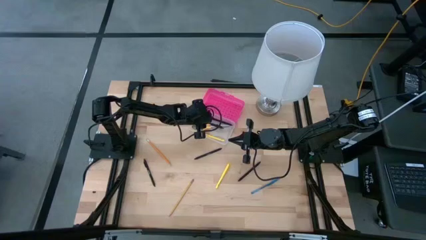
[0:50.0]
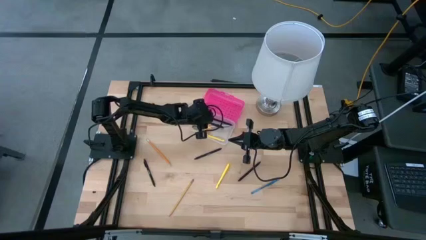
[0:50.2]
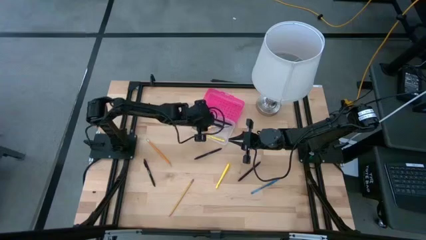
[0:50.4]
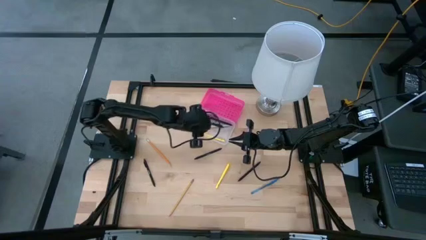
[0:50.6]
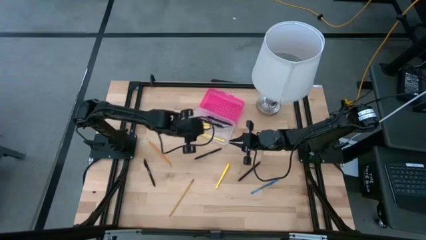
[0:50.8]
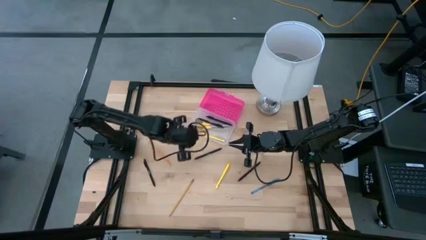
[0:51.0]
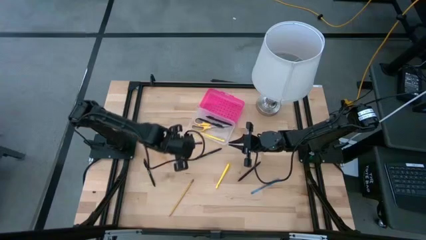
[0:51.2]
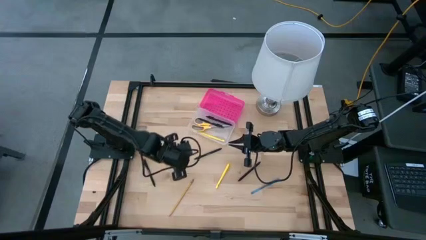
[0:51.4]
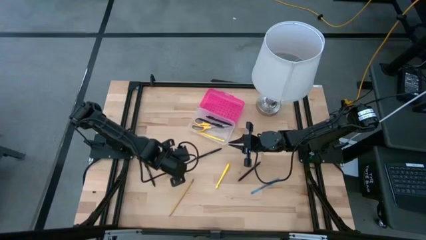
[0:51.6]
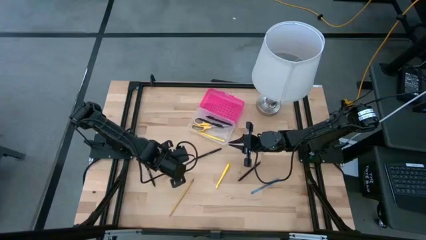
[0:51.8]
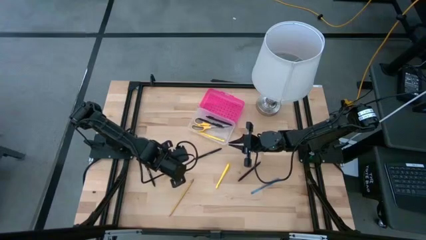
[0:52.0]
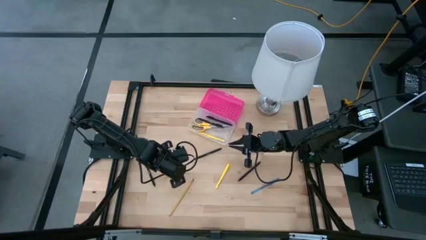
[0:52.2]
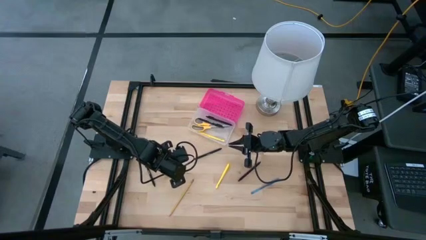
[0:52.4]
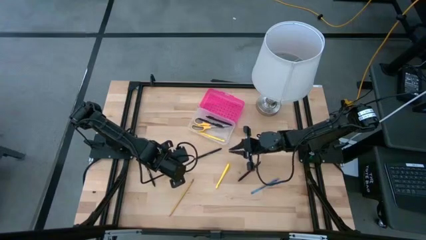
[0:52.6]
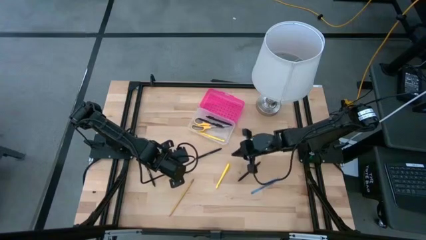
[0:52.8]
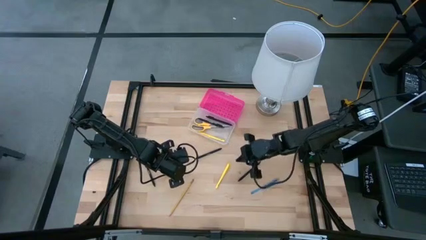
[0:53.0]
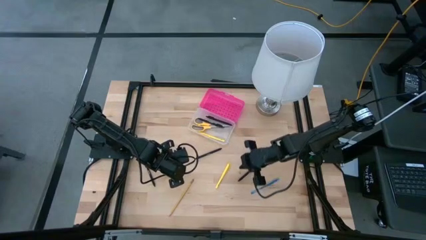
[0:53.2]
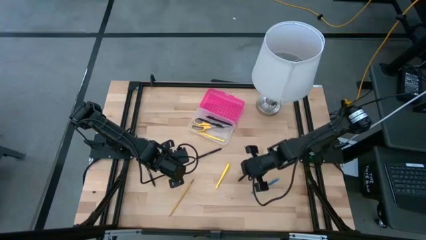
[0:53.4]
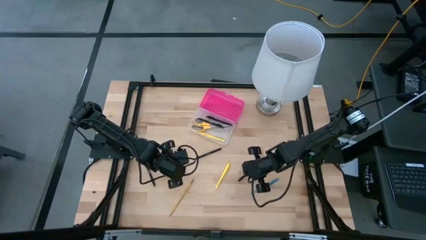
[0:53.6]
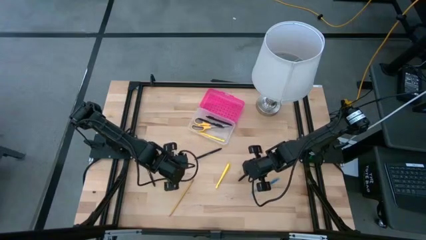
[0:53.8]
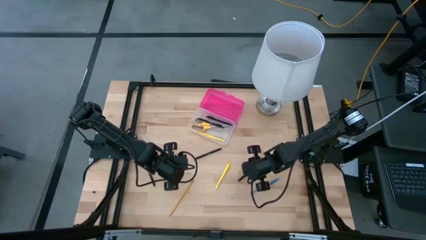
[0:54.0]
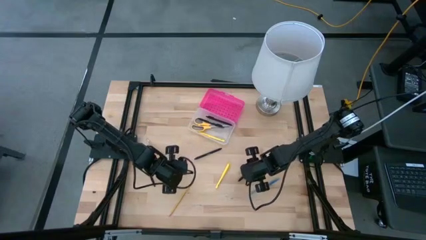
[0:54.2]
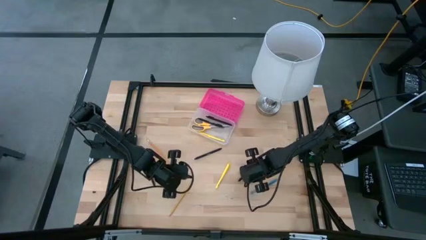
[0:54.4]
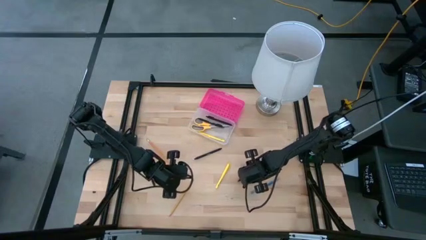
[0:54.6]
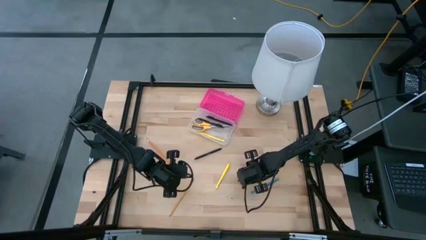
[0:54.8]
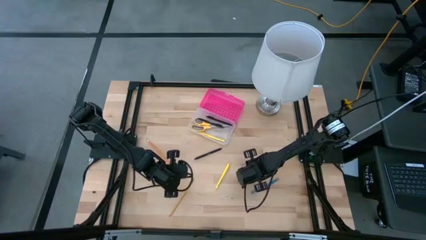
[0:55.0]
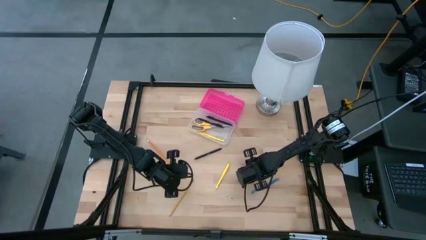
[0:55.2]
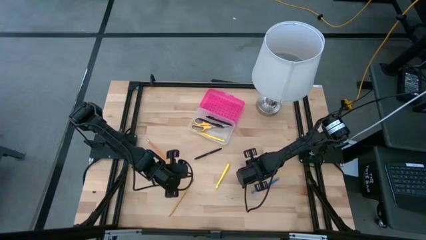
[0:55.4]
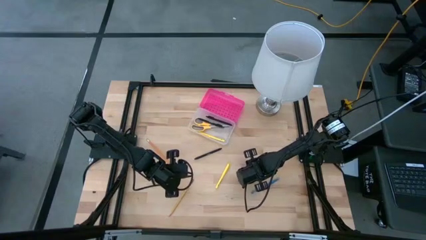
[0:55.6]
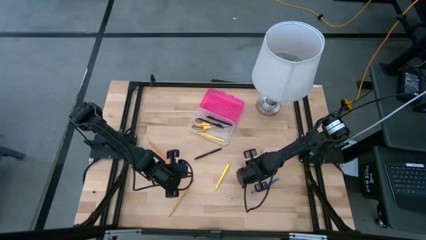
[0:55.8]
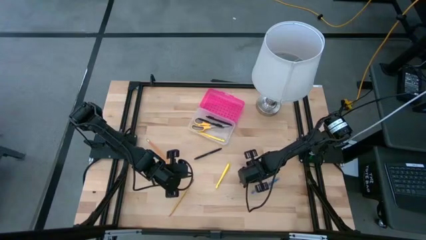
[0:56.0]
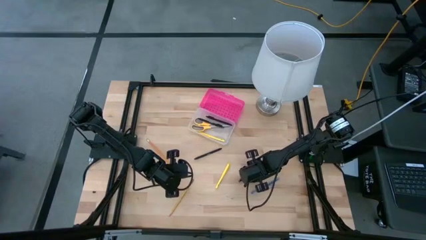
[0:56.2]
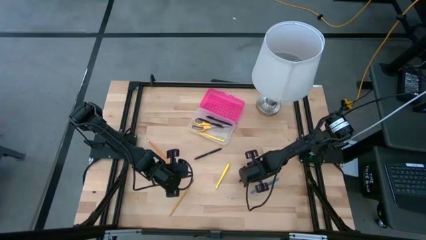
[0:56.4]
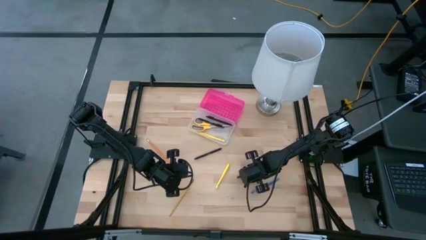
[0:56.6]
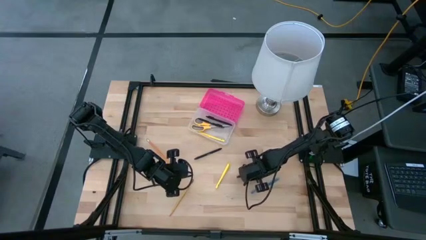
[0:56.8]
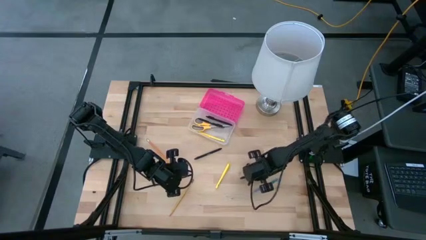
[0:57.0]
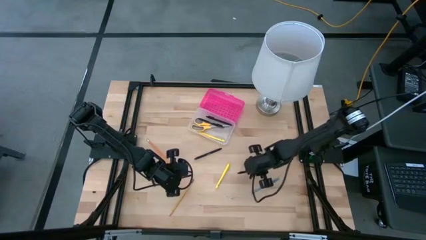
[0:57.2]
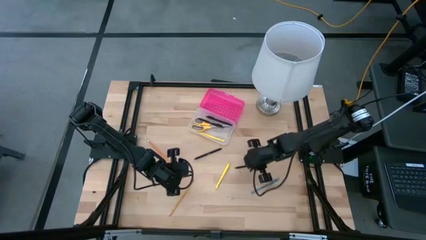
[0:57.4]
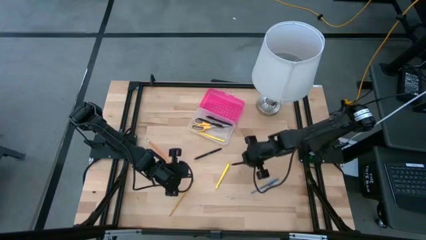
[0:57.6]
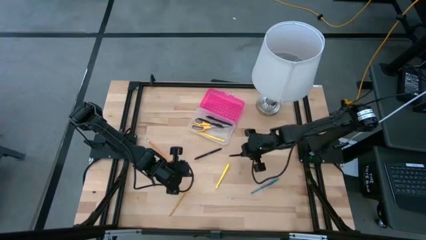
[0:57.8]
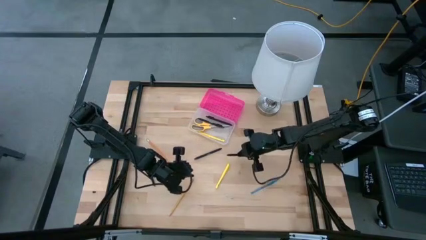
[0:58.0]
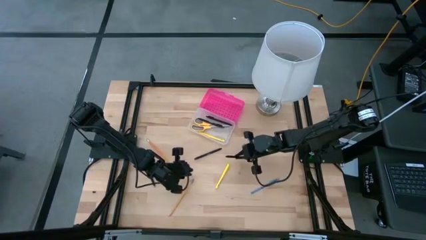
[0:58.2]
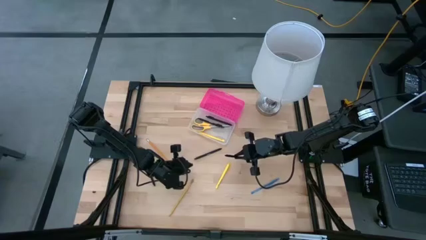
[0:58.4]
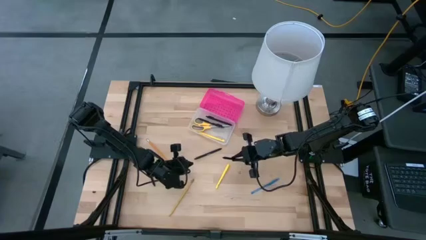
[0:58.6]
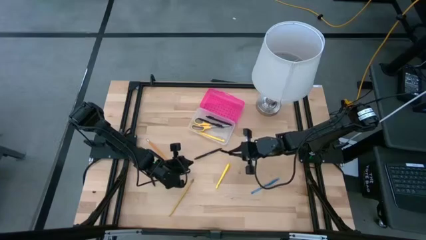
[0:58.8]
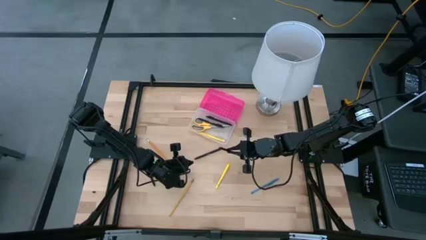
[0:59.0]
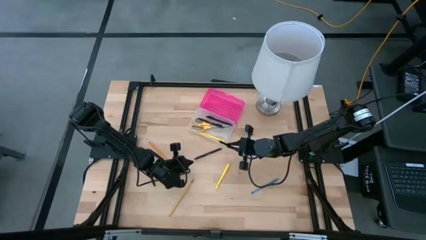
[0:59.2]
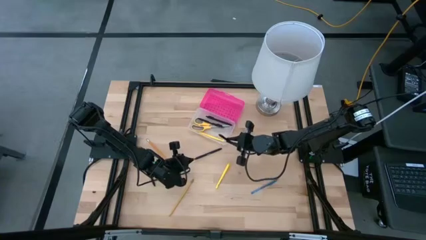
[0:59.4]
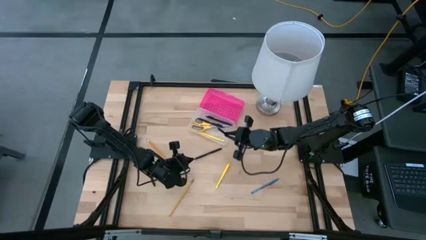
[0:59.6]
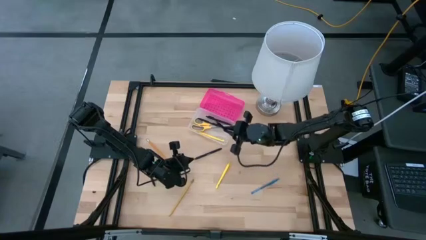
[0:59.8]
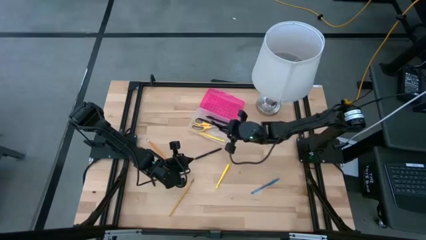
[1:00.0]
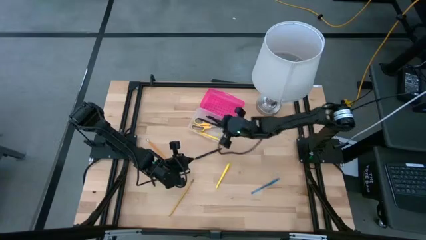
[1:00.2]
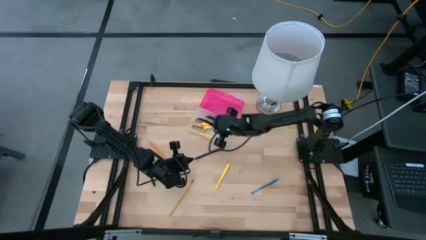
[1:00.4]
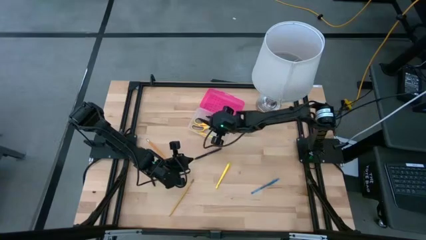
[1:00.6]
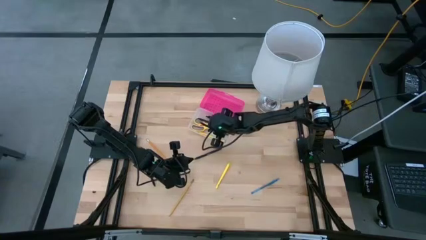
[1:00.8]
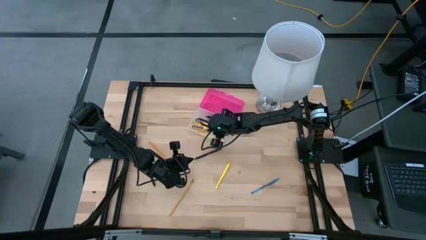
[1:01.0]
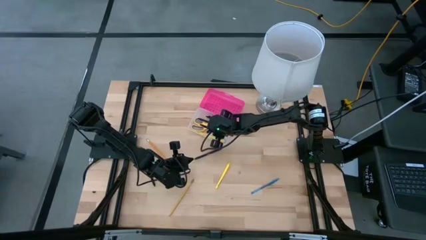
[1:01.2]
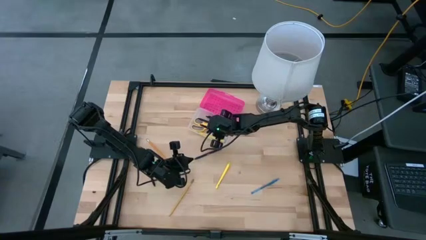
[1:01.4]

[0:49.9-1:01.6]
Task: Pick & place school supplies into a supply box
Put the black pen into the pink supply box

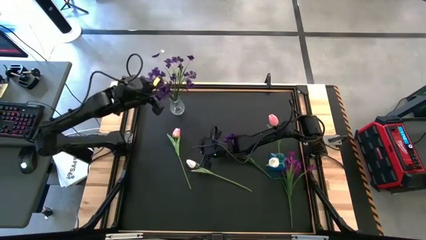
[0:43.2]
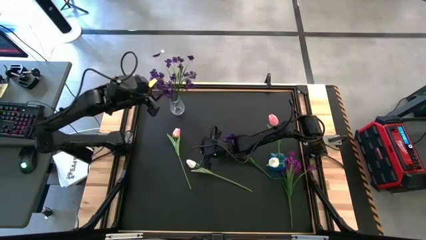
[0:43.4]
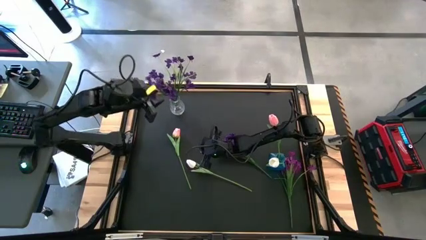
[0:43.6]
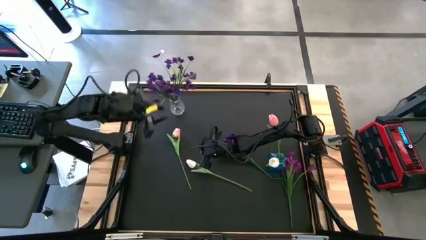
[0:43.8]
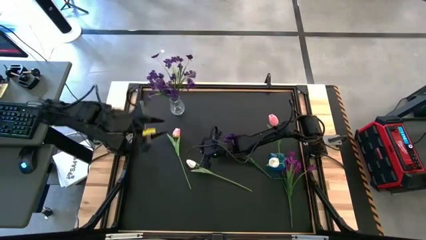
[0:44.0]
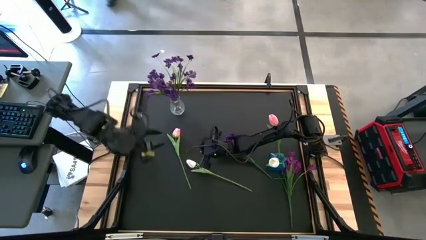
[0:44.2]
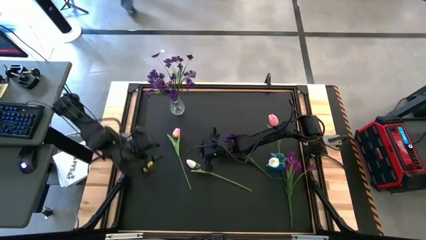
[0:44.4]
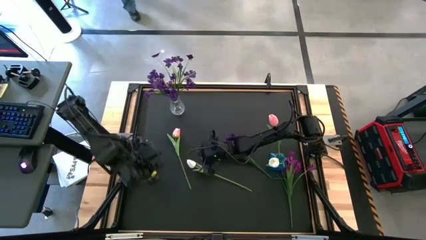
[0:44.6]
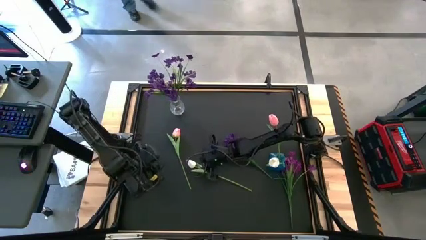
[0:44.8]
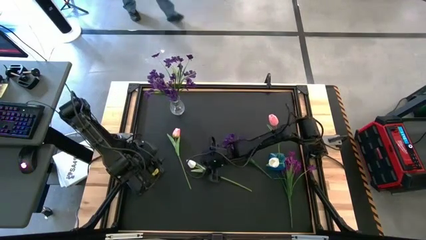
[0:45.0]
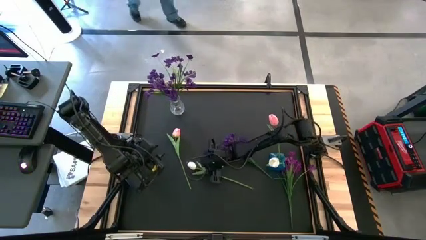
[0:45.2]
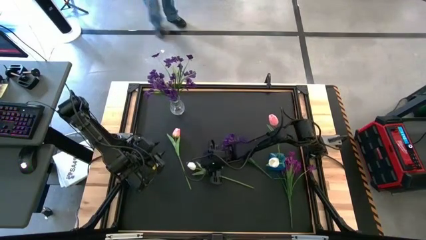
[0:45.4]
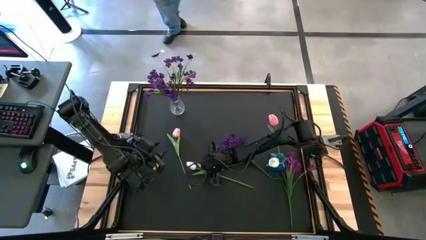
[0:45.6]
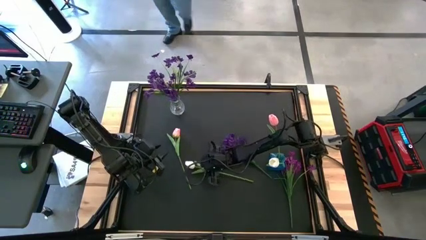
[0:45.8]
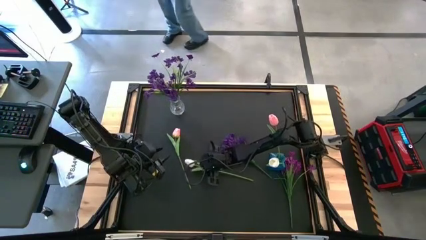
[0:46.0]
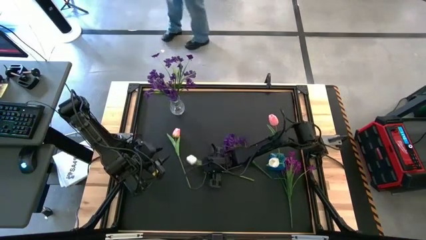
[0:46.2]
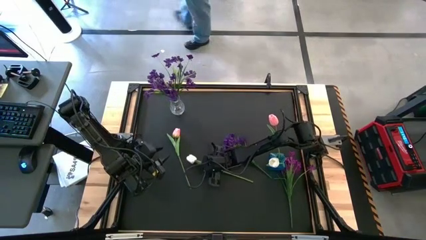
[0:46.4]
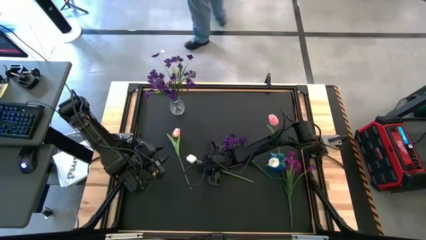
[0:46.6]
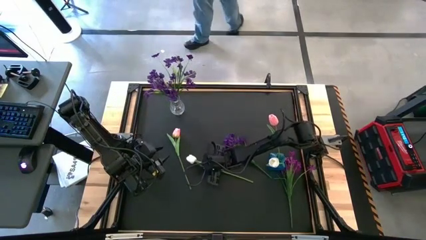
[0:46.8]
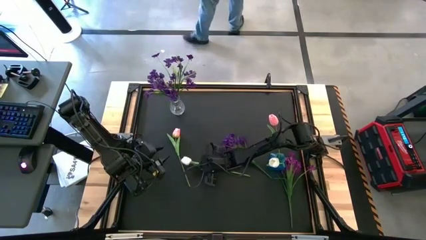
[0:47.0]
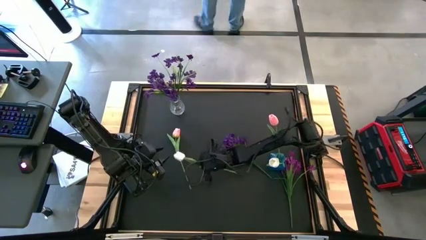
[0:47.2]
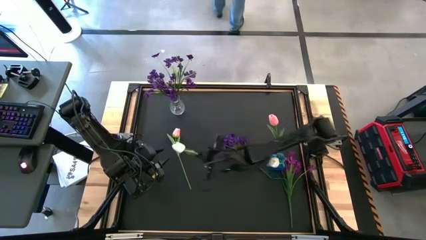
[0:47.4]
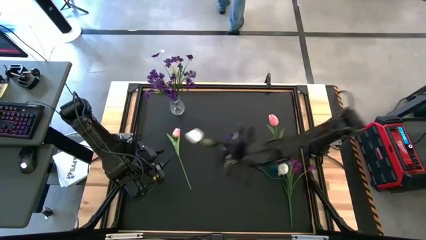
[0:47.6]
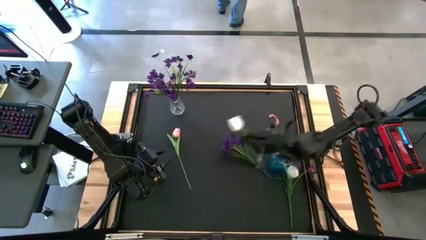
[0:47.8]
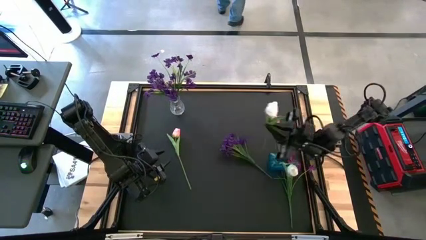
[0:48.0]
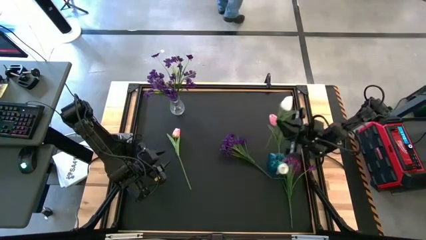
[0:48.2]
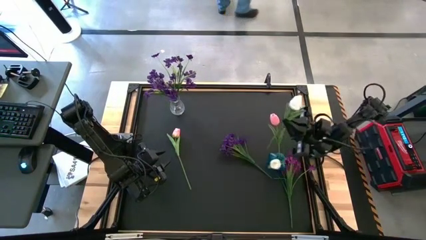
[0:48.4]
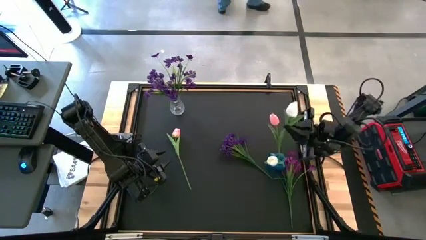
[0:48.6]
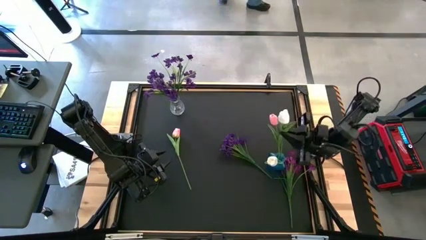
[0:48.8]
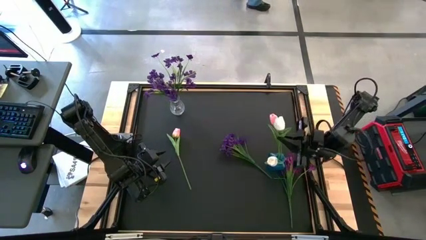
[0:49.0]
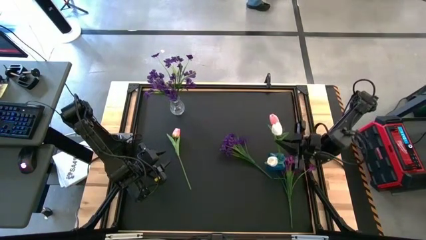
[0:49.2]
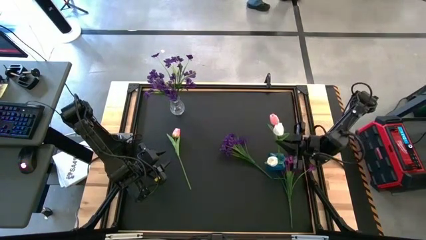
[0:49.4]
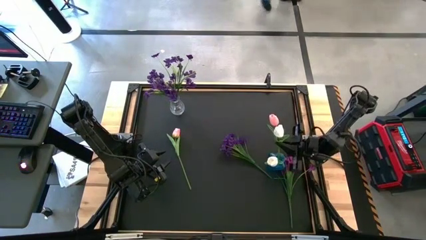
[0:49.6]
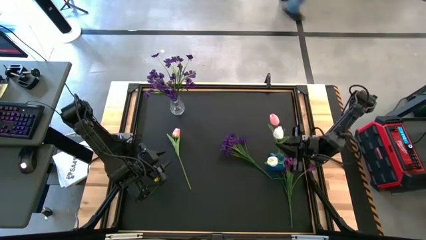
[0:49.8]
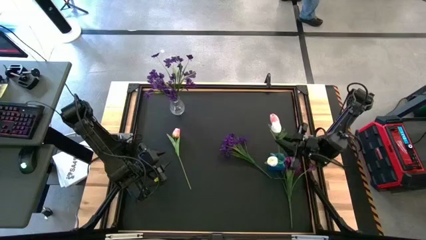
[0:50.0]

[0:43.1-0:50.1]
Task: Sort flowers into vase by color
Put the white flower into the transparent blue vase
